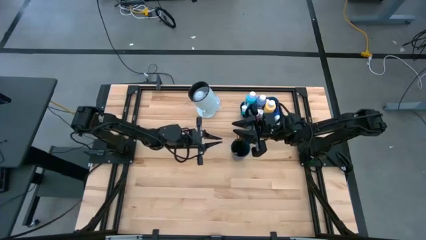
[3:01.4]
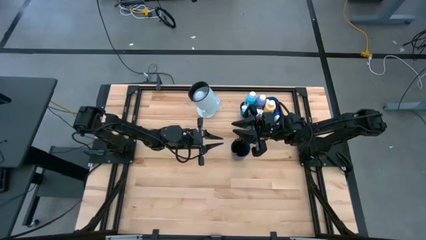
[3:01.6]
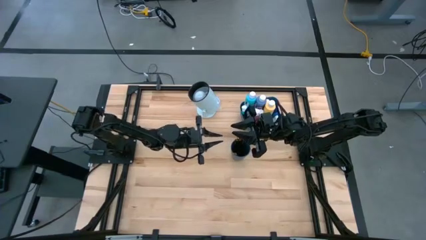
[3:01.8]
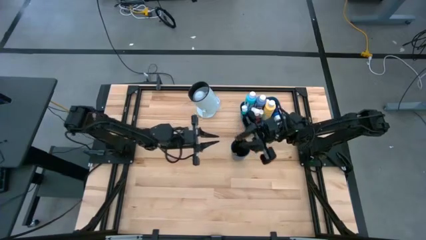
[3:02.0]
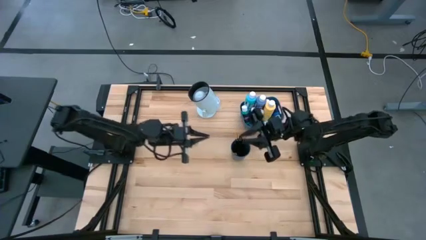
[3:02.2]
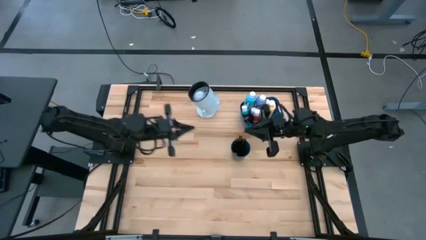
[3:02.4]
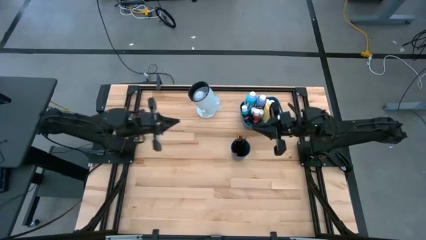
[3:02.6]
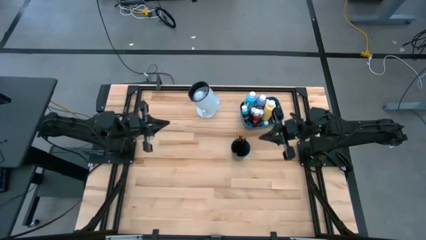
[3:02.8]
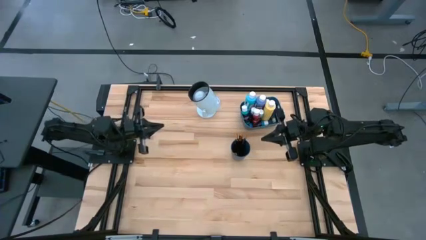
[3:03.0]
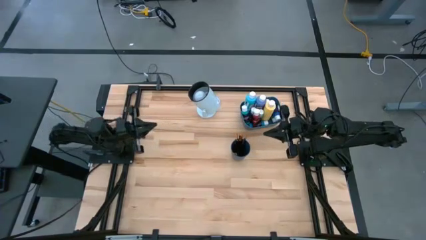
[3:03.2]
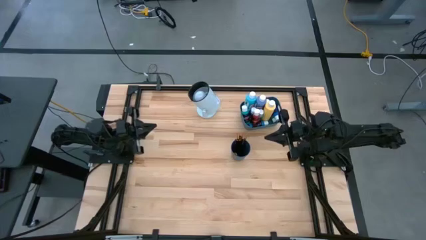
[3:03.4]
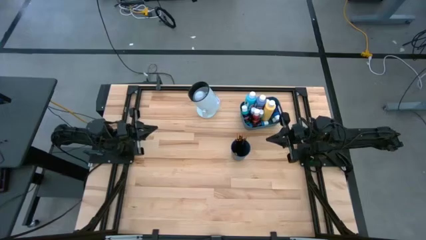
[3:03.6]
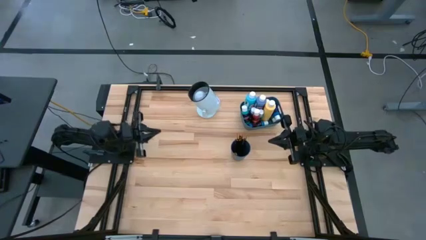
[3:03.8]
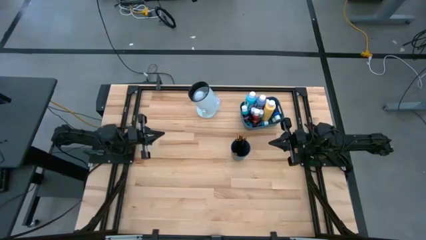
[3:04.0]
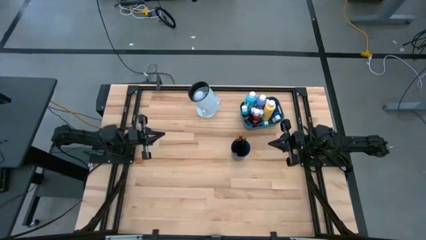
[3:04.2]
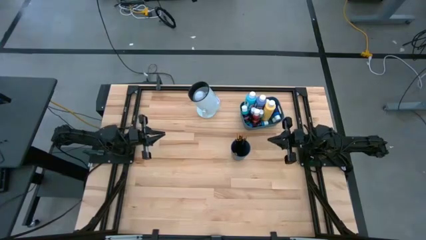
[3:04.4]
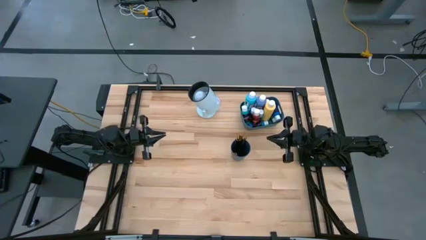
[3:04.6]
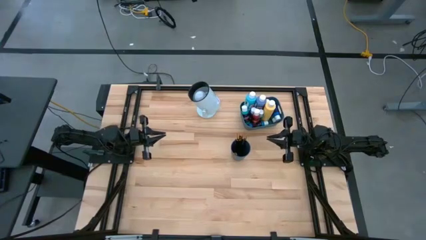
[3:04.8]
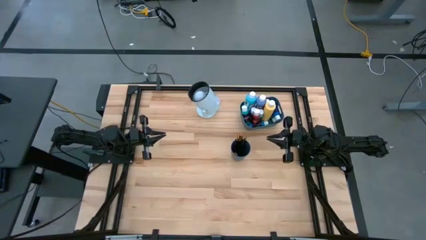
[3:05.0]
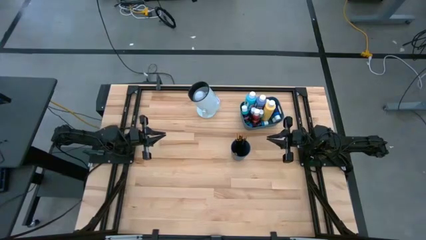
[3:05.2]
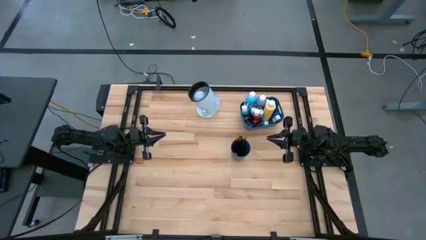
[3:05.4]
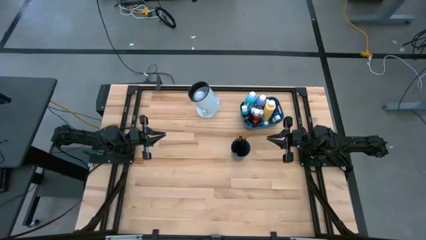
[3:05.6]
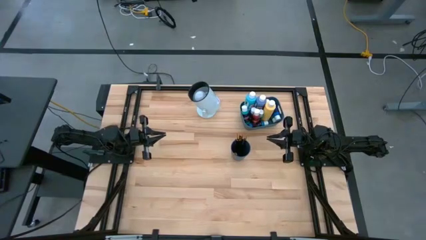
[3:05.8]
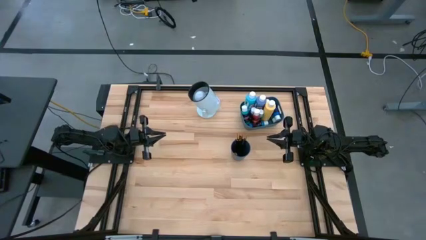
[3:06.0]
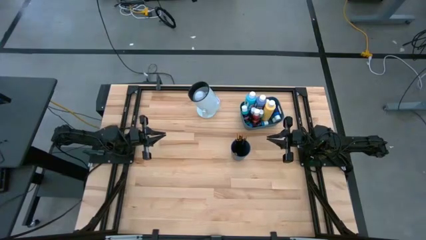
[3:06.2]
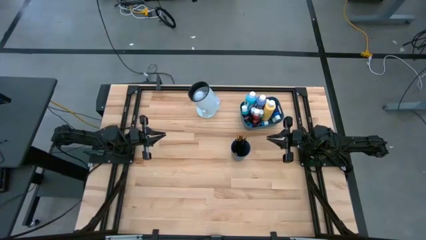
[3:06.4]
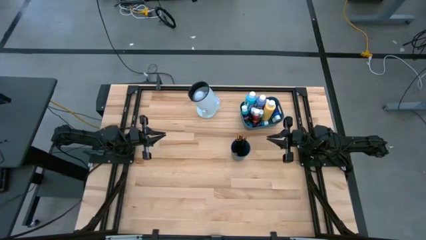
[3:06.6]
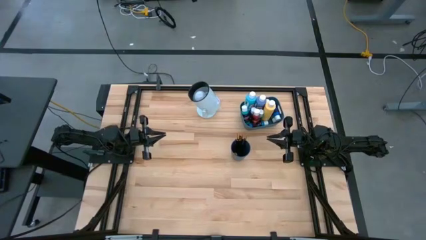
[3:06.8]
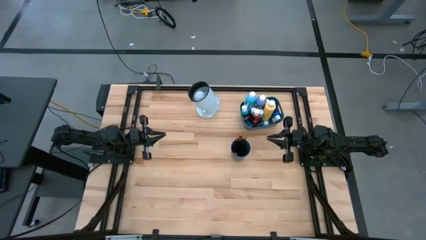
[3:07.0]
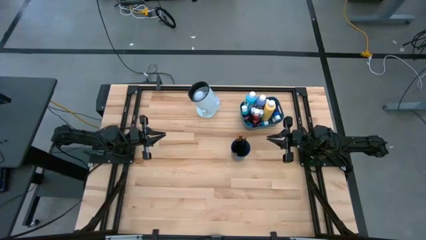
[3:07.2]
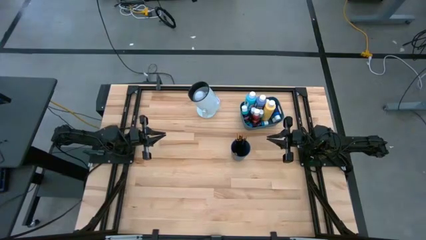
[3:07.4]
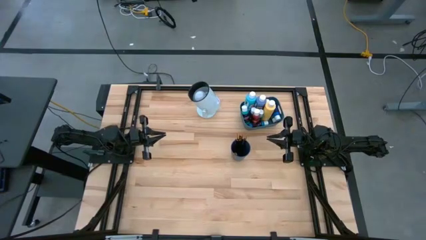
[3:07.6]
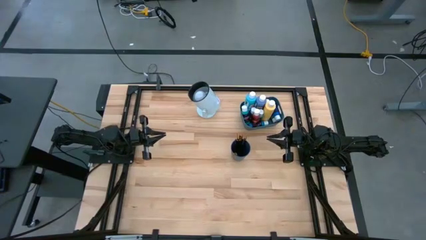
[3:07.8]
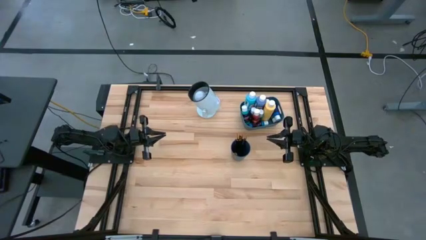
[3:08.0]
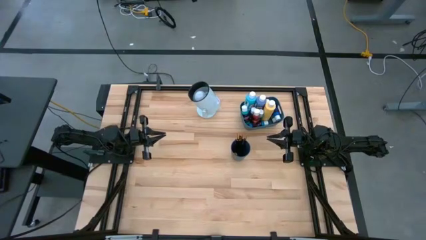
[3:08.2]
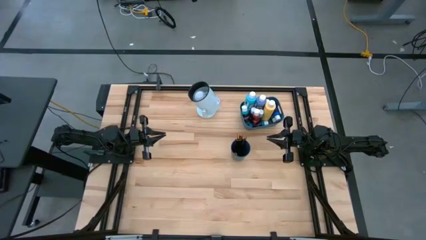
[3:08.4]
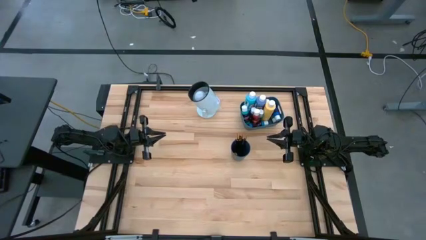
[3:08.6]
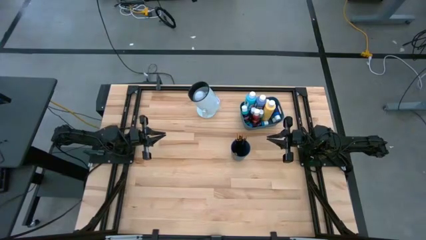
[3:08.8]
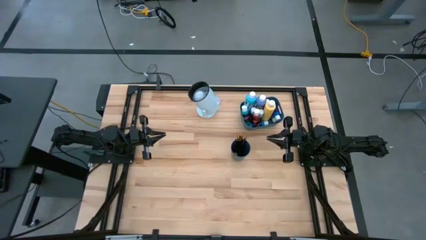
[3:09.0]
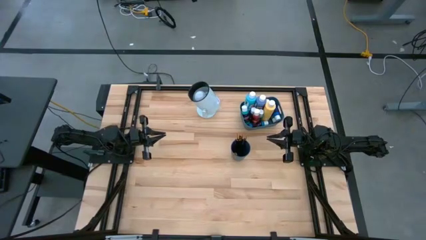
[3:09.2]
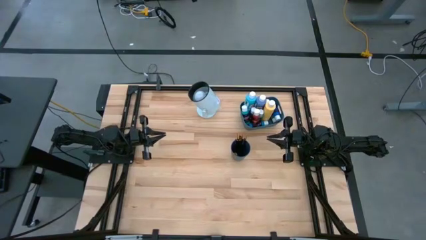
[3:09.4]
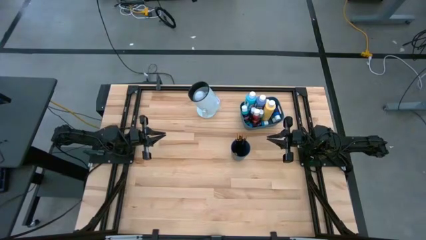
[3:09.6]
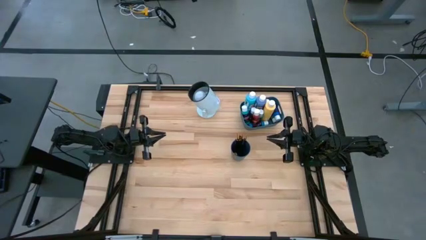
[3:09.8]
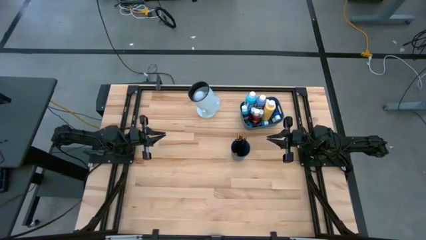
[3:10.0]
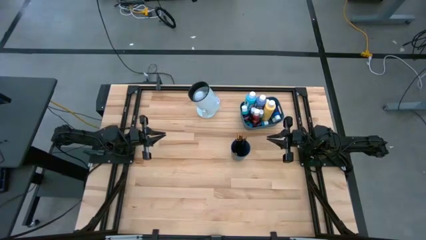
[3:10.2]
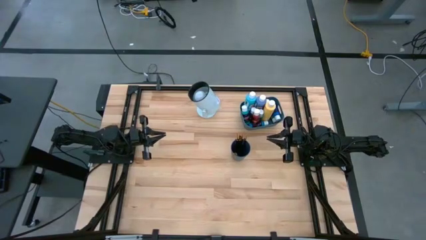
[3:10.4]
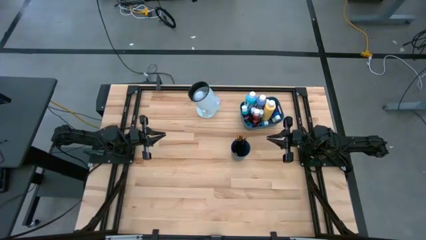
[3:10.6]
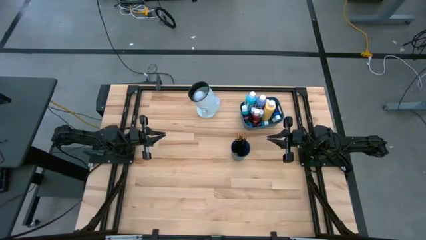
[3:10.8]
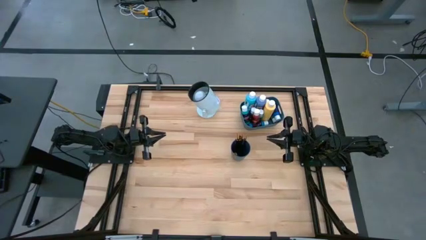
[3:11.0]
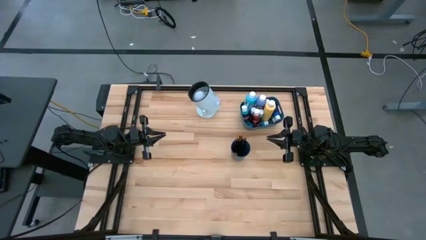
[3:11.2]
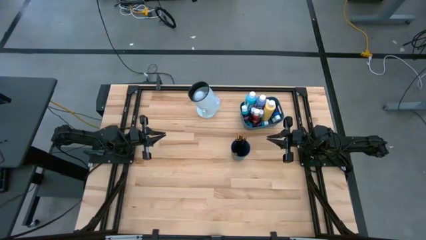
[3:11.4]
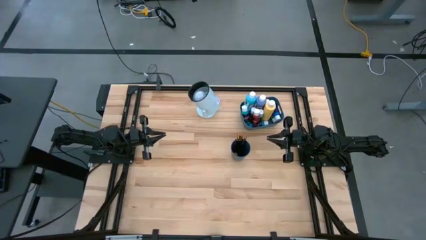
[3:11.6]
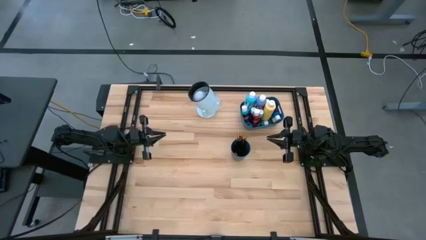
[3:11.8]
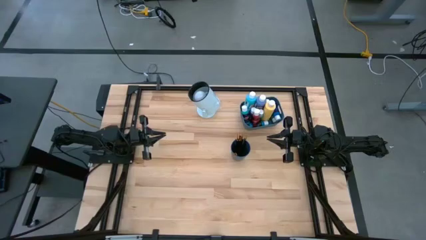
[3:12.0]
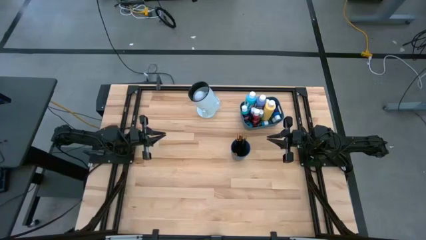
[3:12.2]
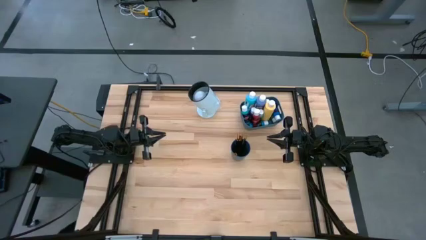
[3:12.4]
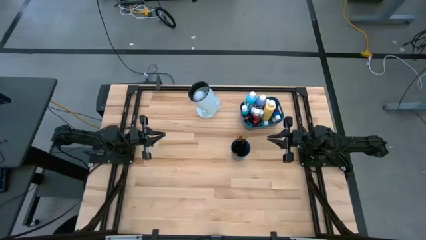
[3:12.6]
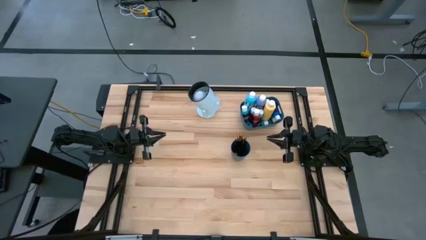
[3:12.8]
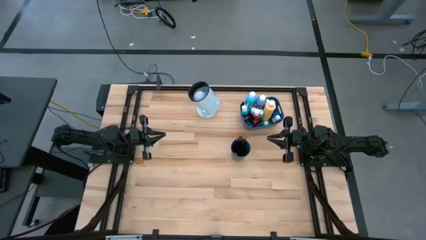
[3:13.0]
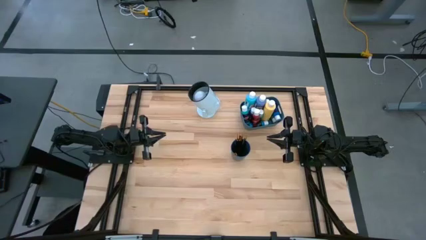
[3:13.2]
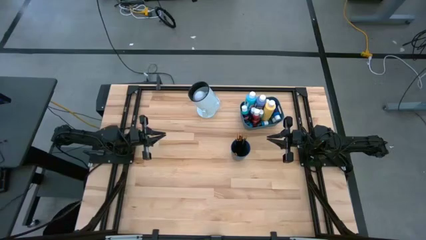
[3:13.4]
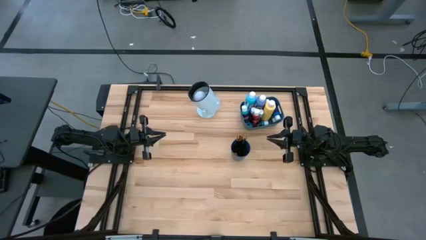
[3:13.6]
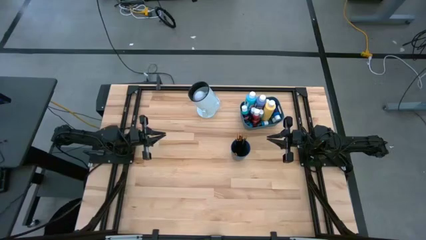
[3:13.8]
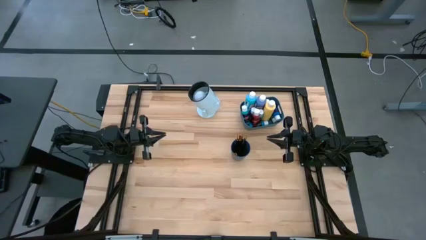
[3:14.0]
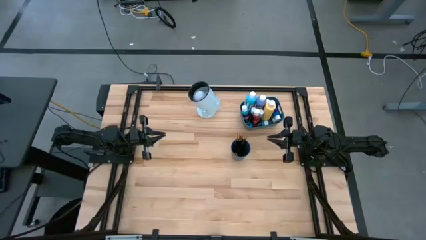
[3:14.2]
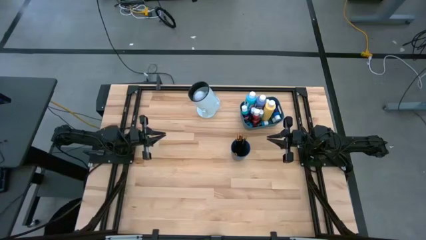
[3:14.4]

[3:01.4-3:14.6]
Task: Pick & Place Paint Supplies
Return to Home Position
